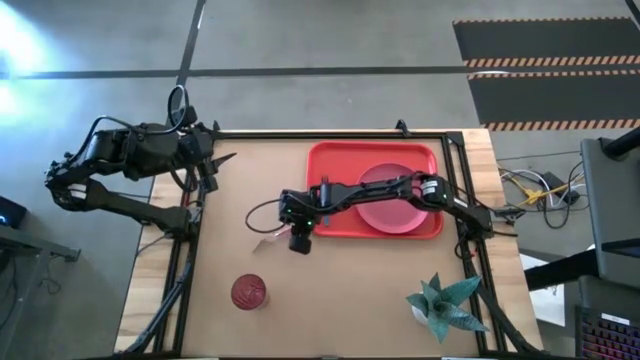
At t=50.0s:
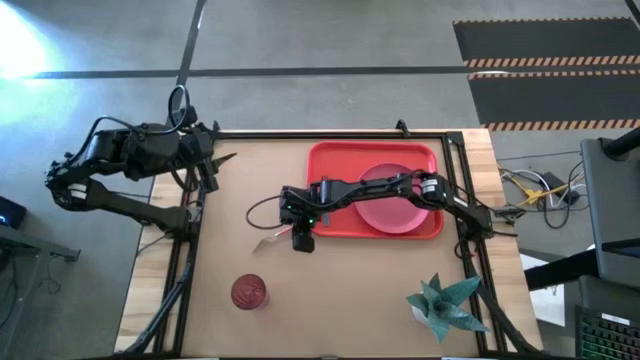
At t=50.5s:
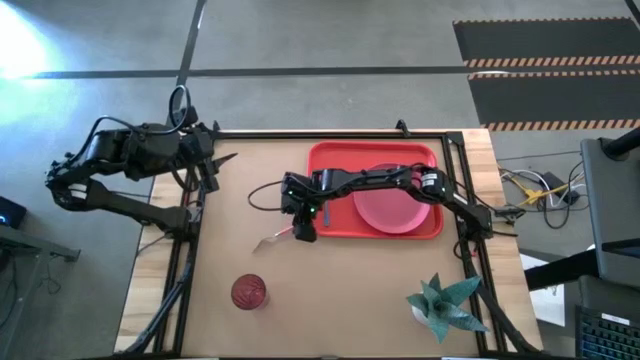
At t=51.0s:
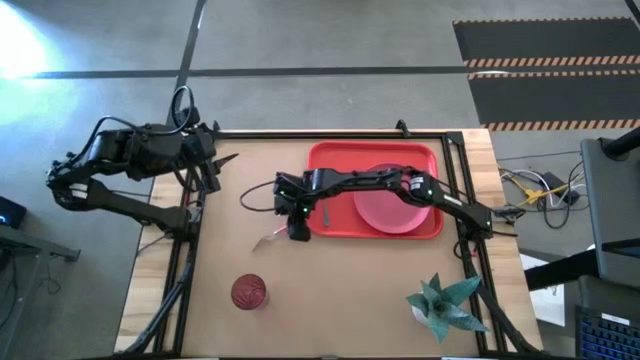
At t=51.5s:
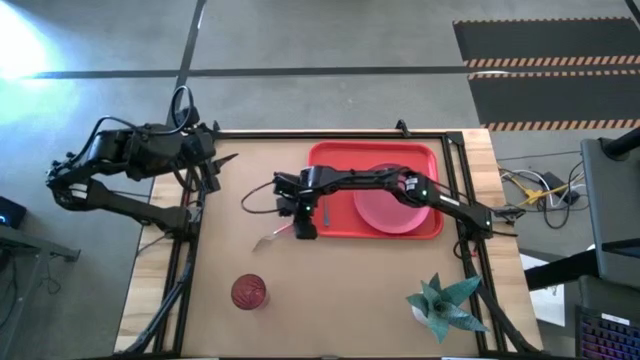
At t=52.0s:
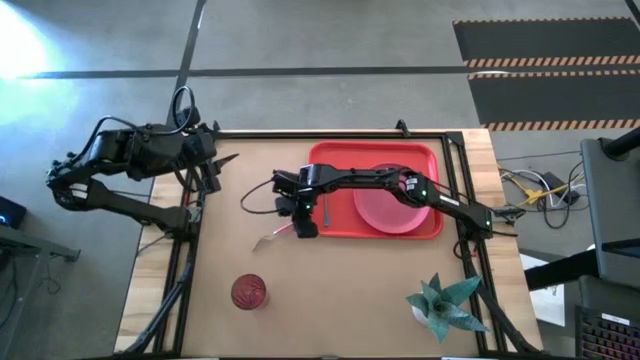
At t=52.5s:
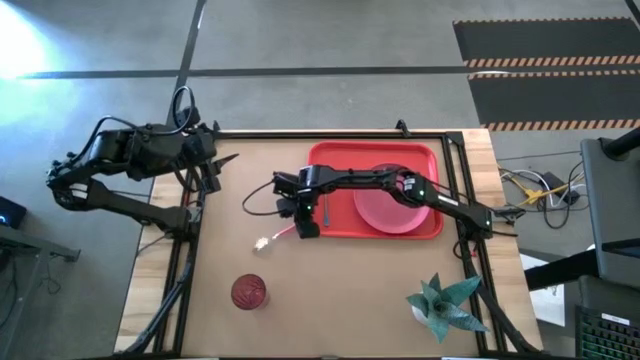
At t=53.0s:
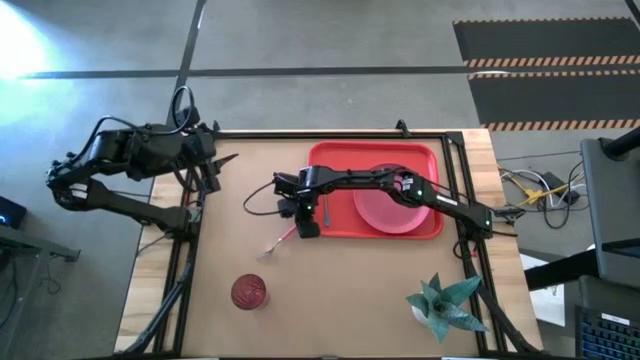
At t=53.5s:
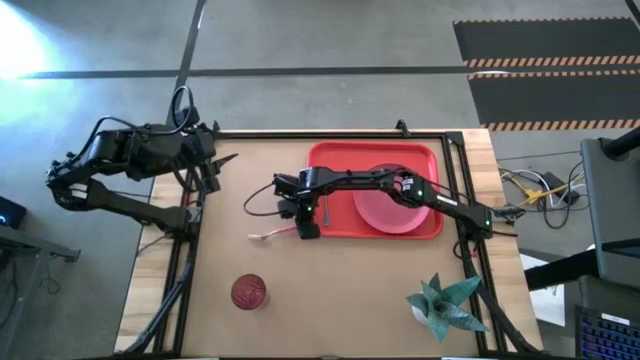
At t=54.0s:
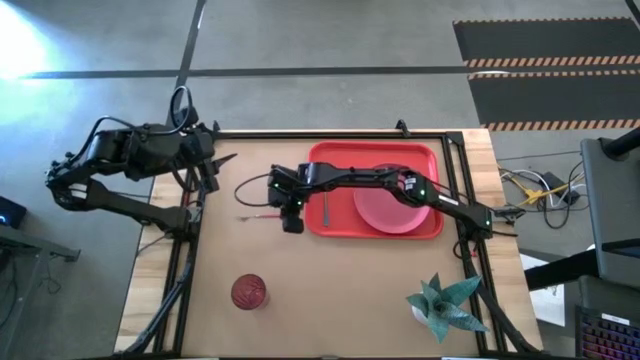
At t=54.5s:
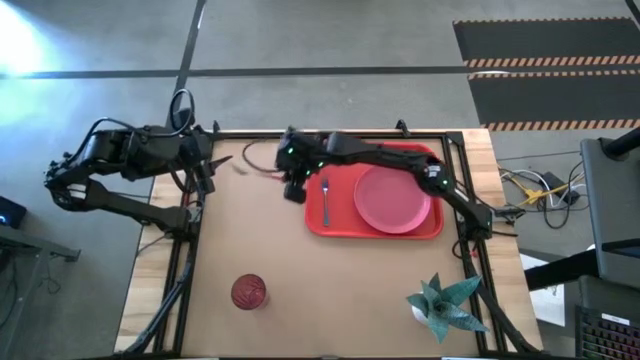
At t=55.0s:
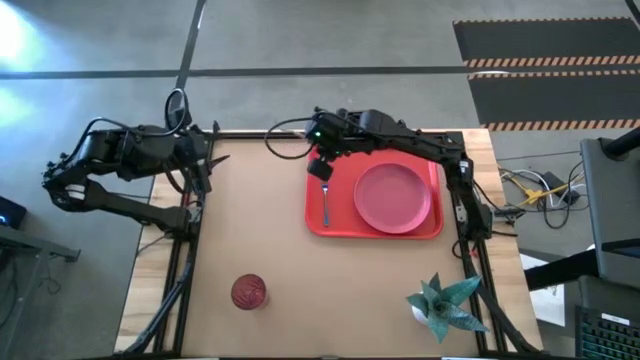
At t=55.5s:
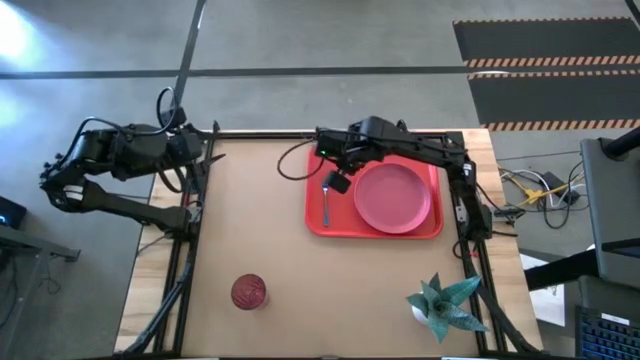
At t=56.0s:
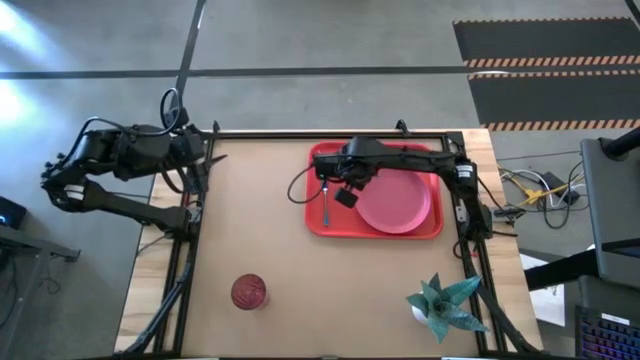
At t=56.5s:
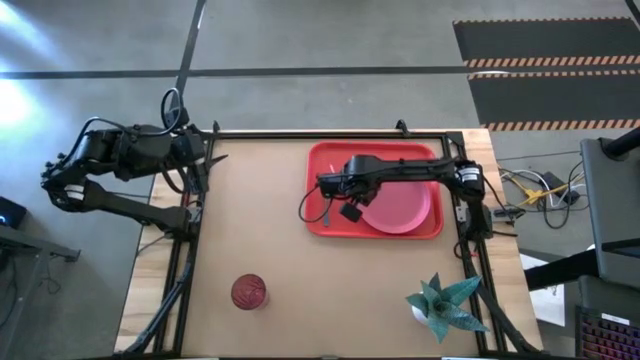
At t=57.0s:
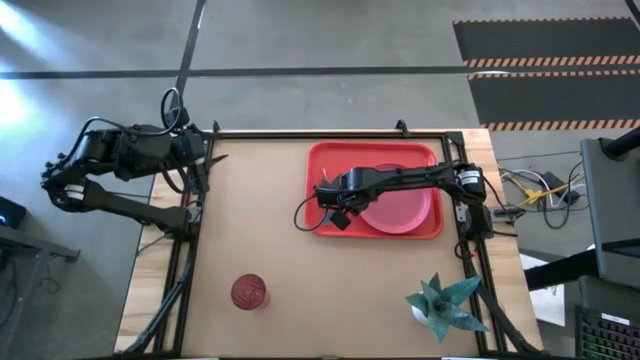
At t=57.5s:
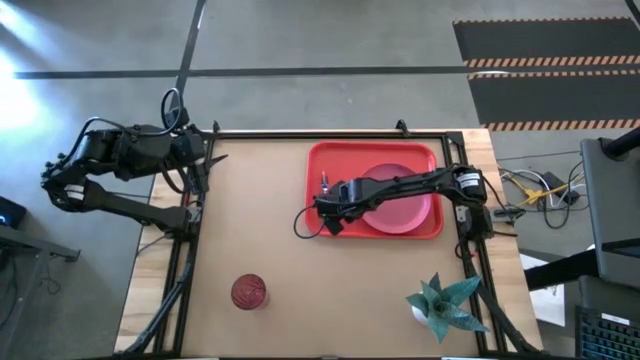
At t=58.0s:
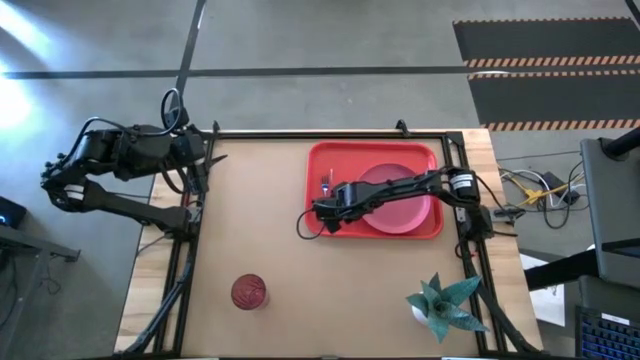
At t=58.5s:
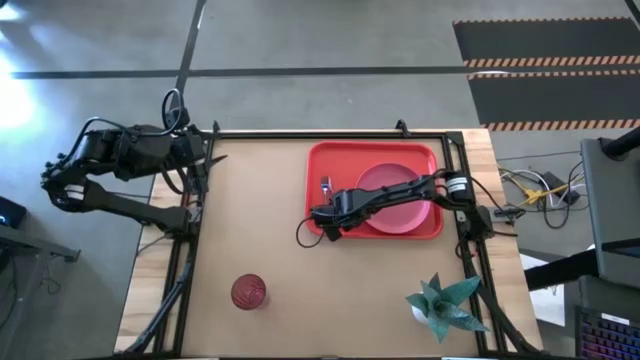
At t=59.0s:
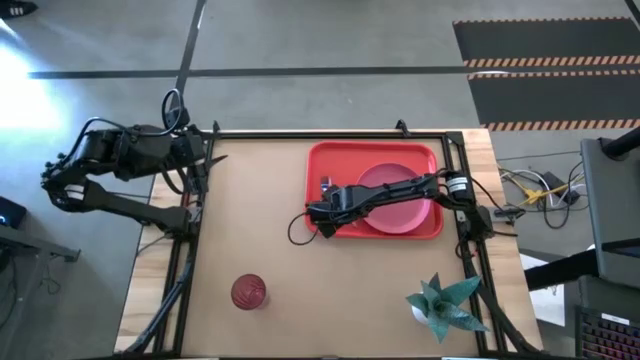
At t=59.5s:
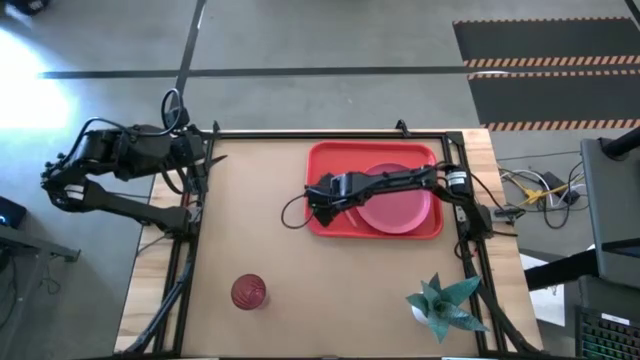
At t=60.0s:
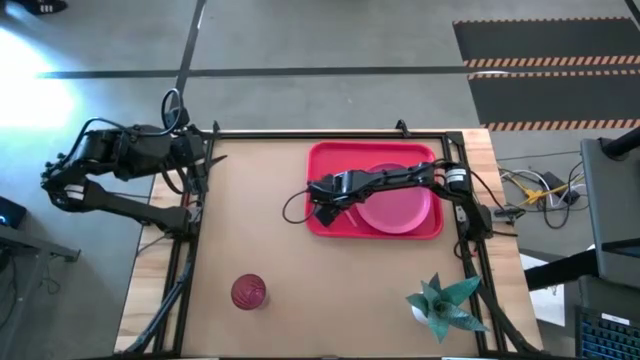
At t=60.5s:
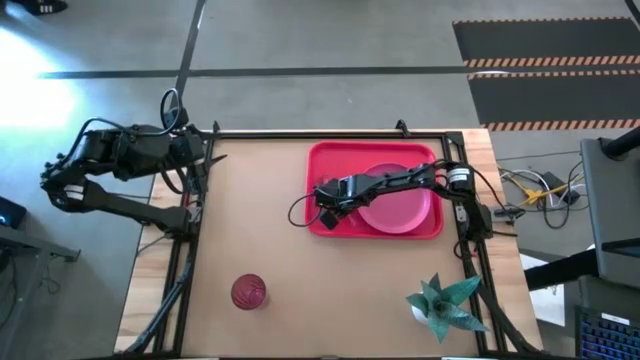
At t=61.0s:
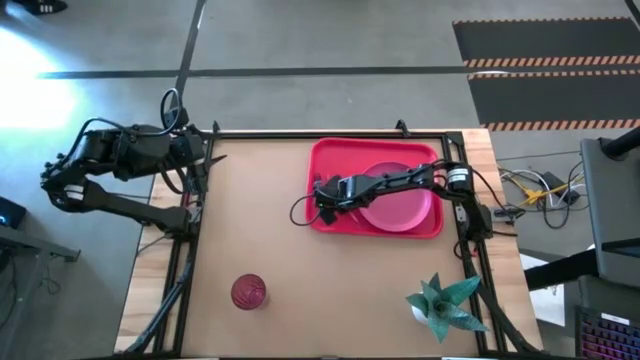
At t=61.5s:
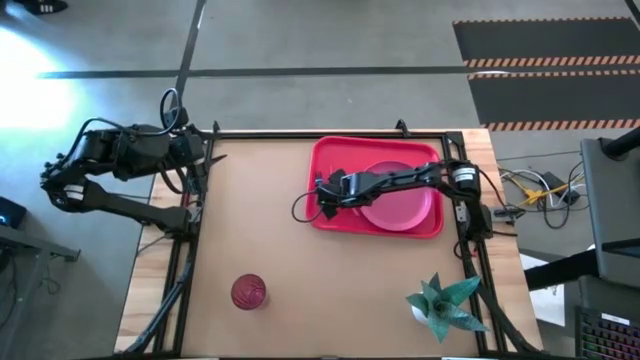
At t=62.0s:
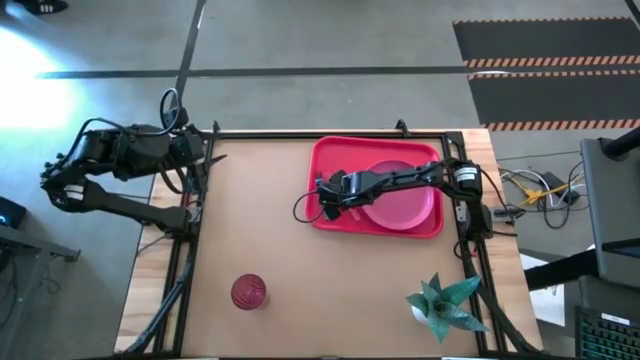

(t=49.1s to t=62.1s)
Task: Pick and place plate/cup/fork/spoon on tray
Put the pink fork on the red tray to the right of the pink plate

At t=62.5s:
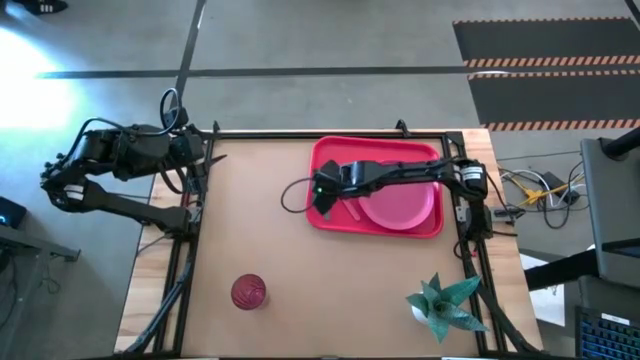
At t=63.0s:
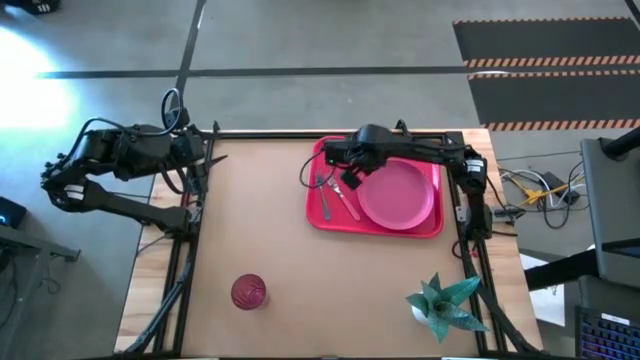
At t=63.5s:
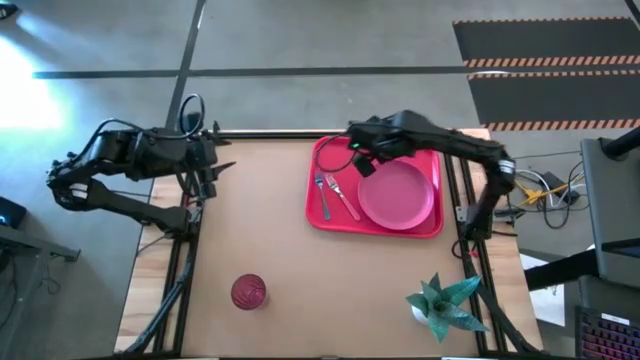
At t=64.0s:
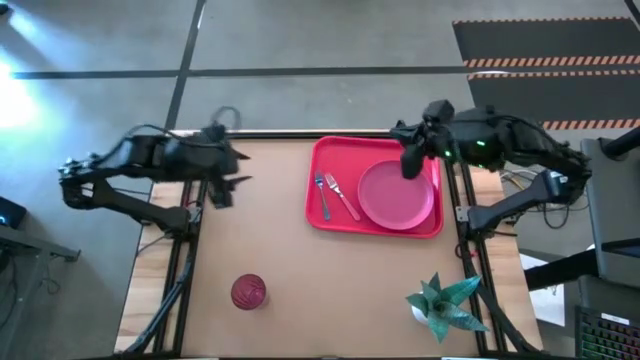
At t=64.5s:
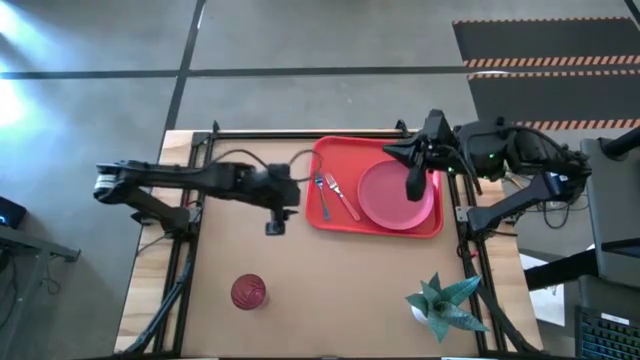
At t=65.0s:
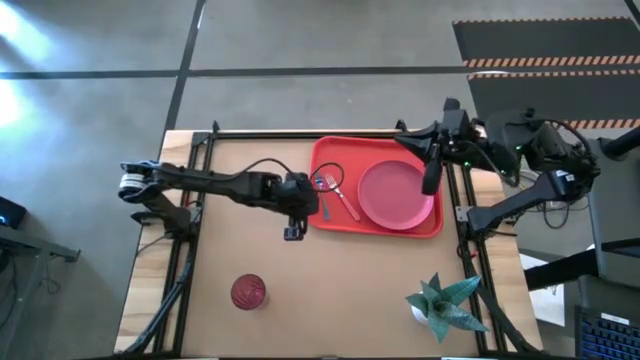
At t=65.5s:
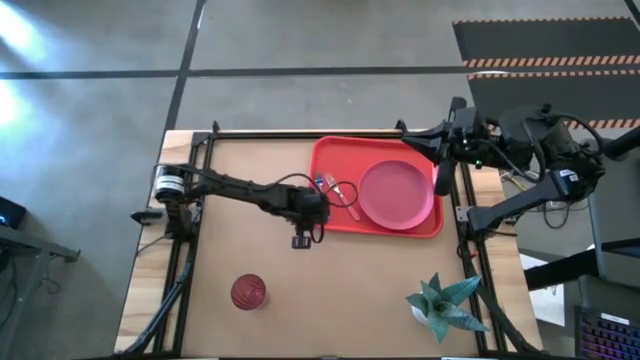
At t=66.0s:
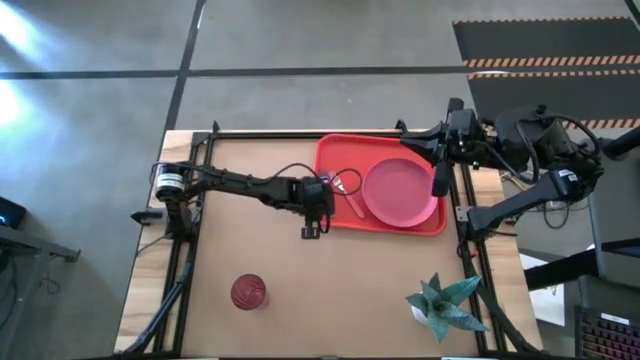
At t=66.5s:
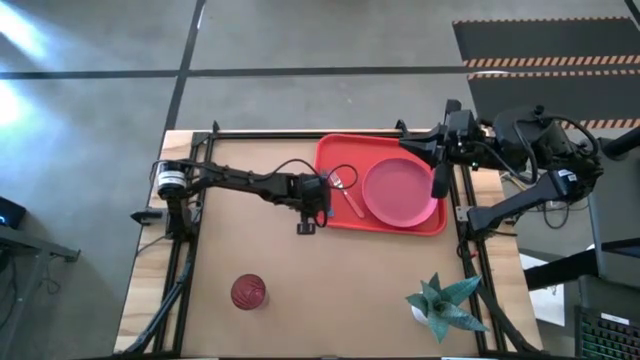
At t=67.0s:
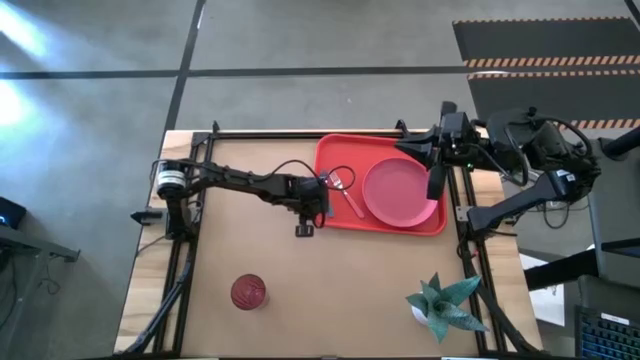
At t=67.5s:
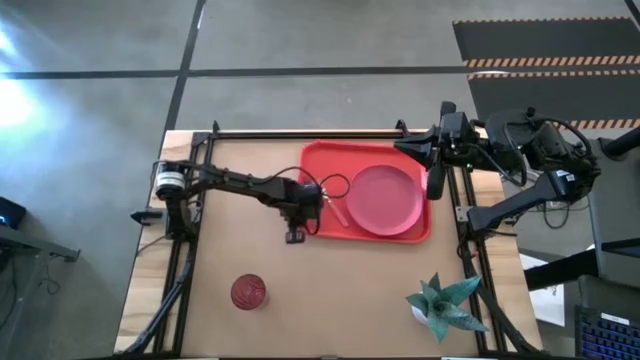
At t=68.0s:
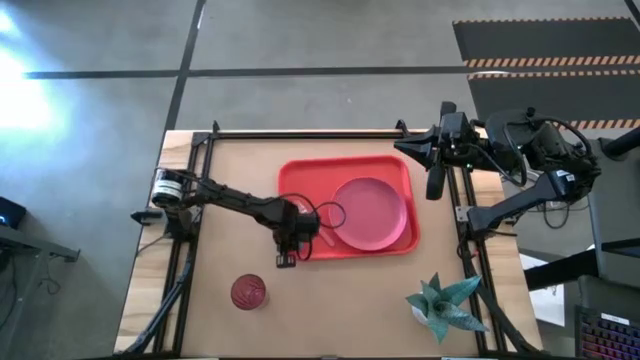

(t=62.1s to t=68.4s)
Adjust the red tray

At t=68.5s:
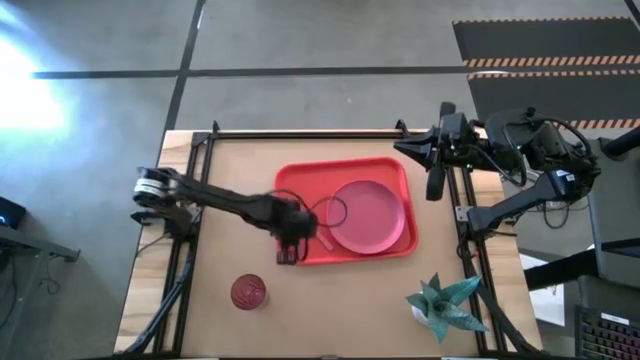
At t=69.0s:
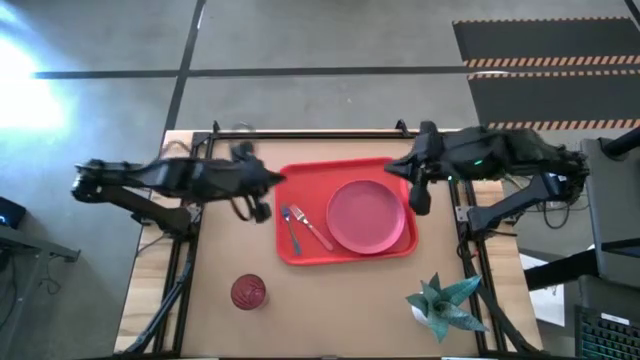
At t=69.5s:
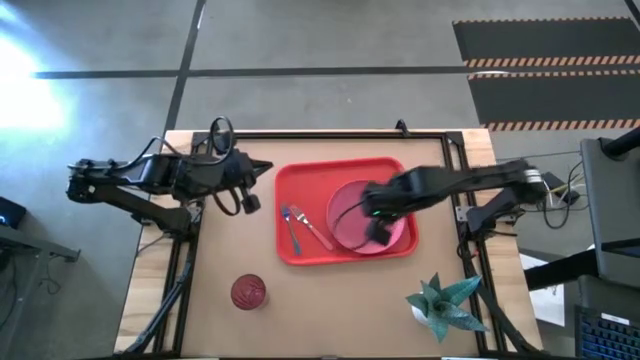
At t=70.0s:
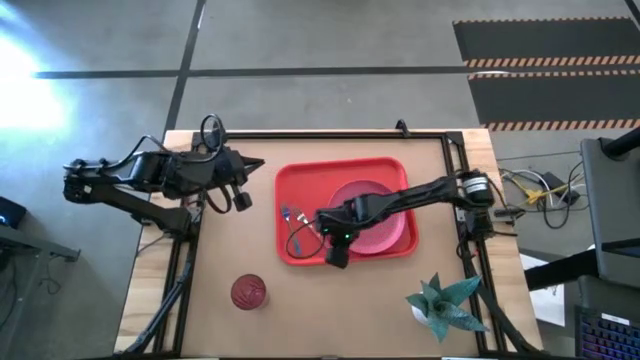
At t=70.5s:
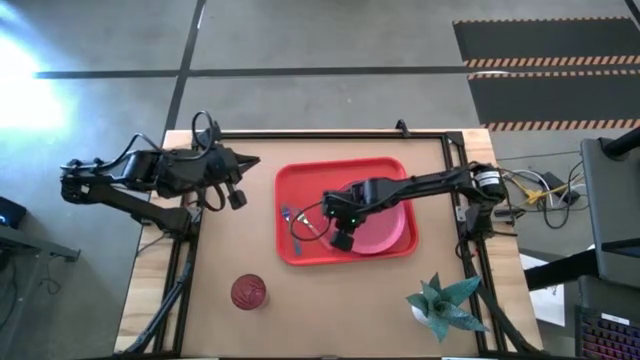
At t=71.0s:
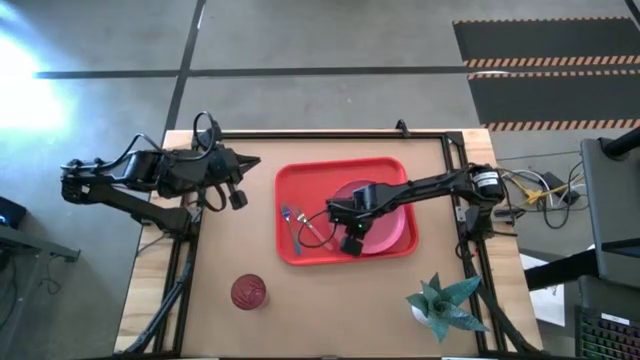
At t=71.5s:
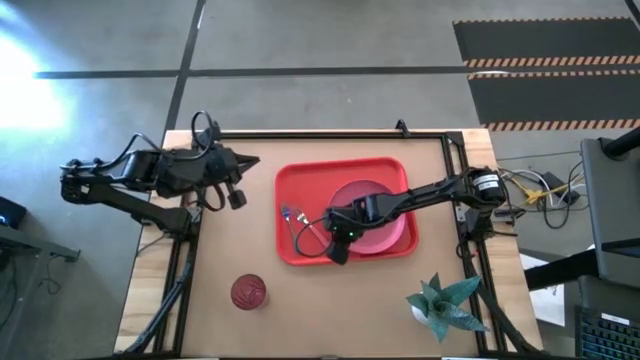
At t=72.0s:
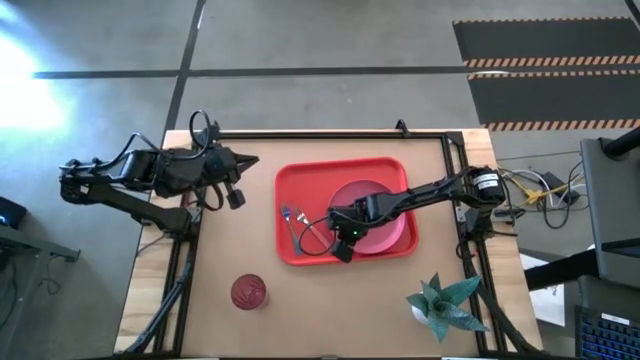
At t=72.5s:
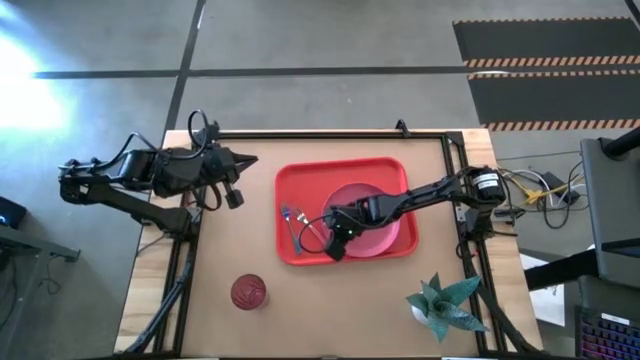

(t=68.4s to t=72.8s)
Adjust the pink plate on the red tray
